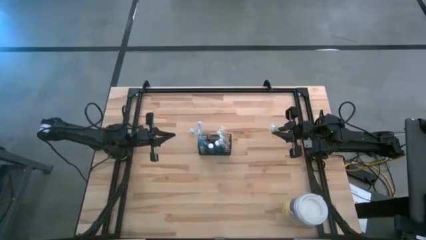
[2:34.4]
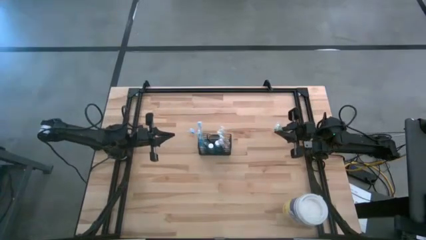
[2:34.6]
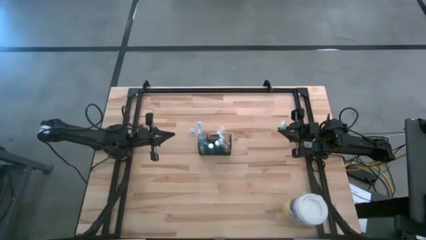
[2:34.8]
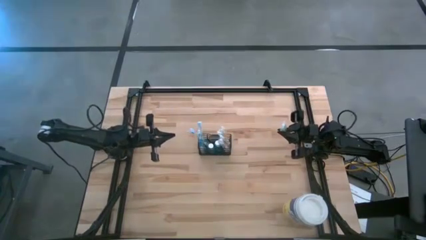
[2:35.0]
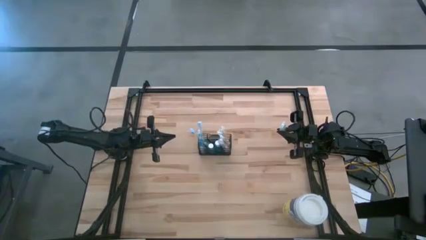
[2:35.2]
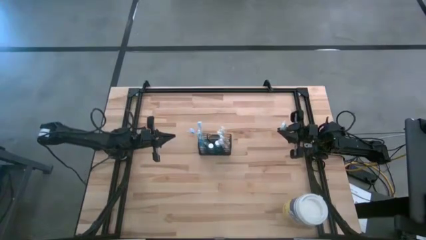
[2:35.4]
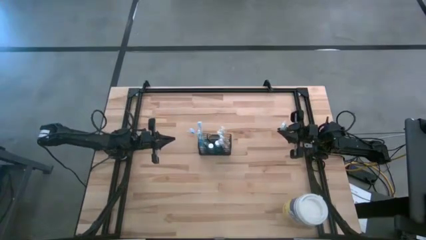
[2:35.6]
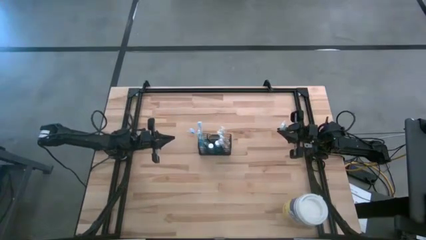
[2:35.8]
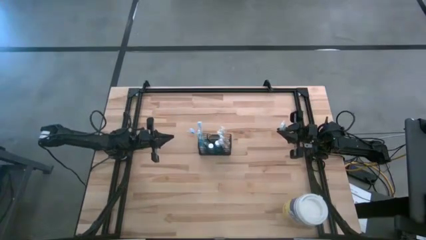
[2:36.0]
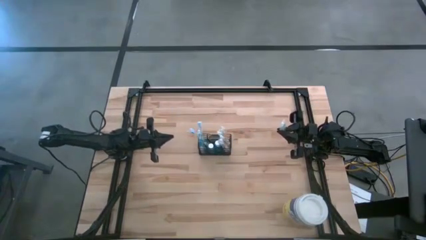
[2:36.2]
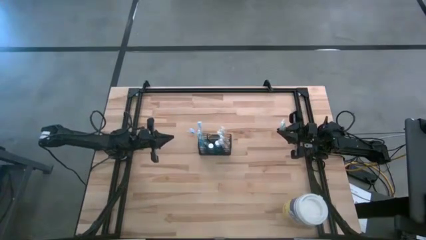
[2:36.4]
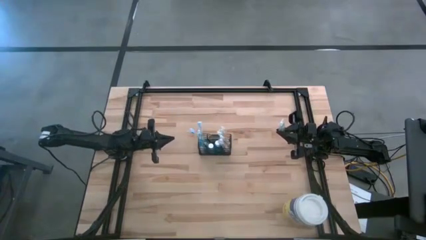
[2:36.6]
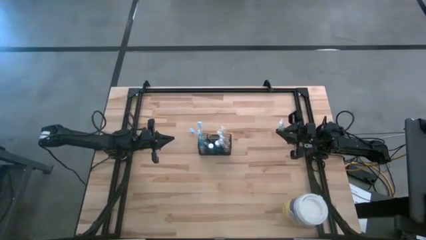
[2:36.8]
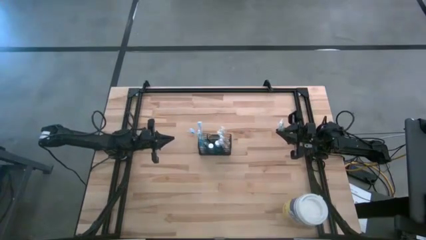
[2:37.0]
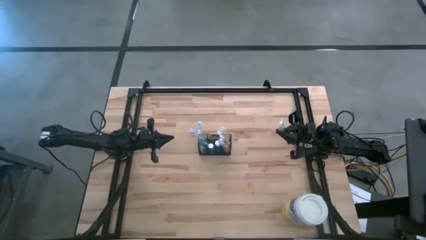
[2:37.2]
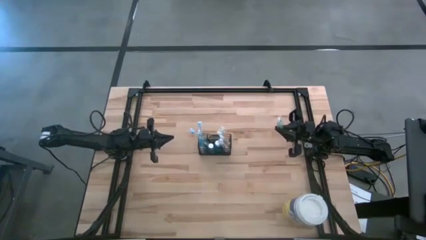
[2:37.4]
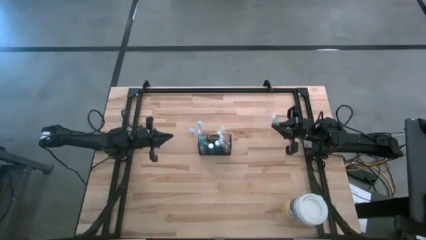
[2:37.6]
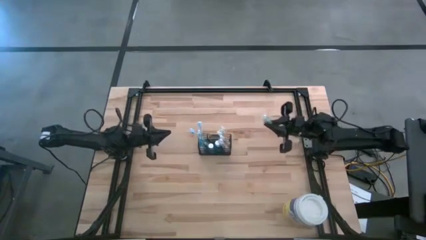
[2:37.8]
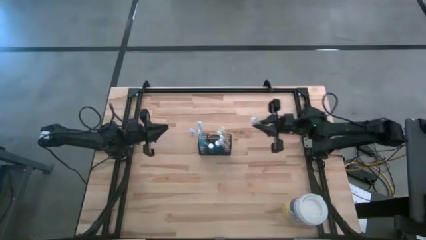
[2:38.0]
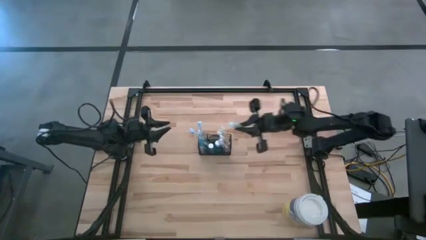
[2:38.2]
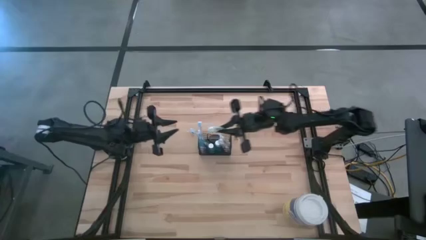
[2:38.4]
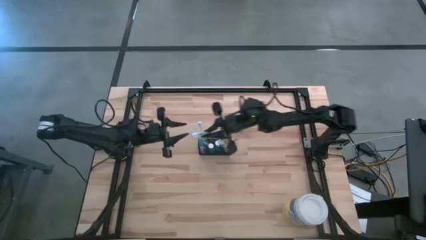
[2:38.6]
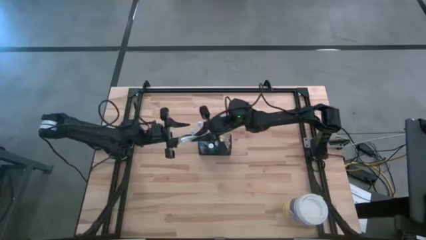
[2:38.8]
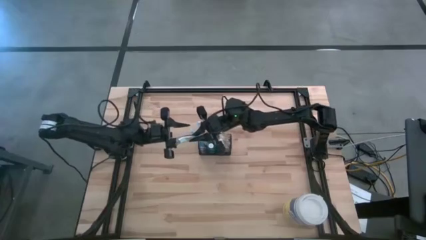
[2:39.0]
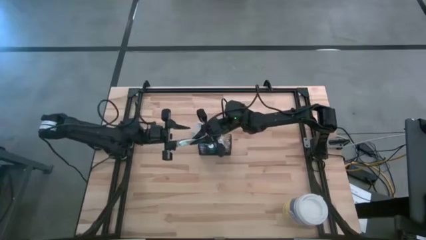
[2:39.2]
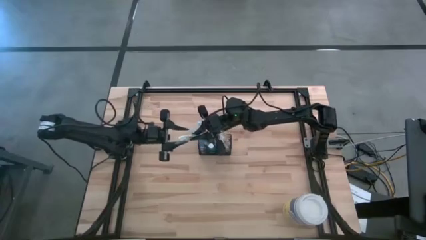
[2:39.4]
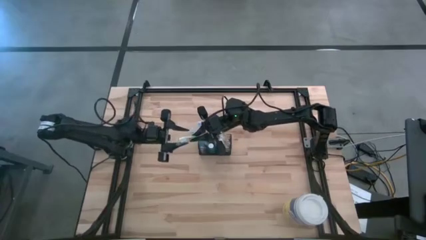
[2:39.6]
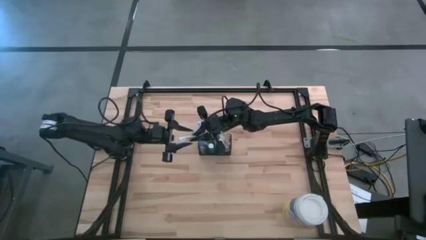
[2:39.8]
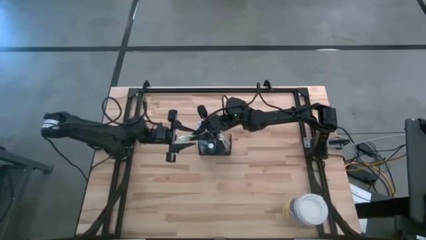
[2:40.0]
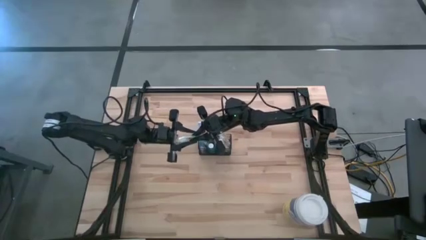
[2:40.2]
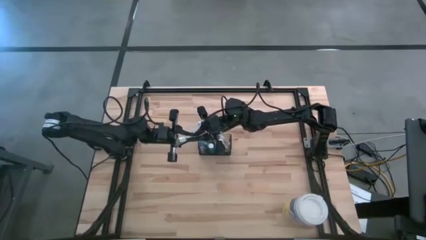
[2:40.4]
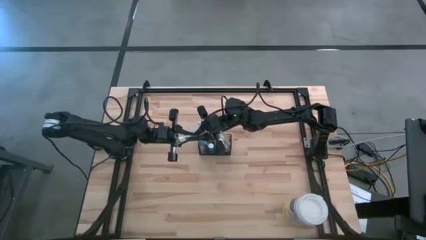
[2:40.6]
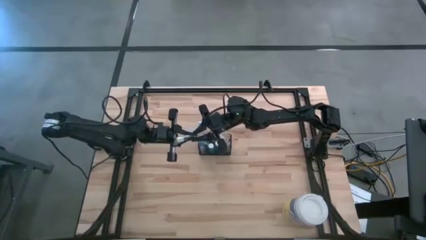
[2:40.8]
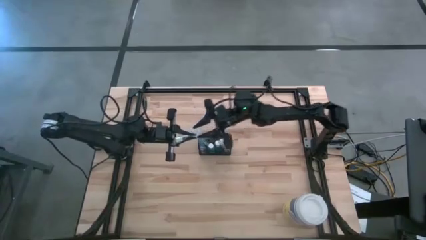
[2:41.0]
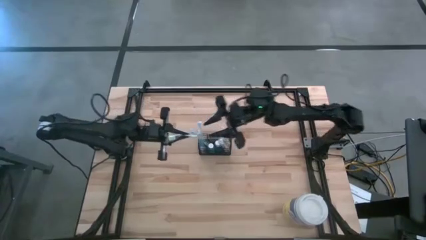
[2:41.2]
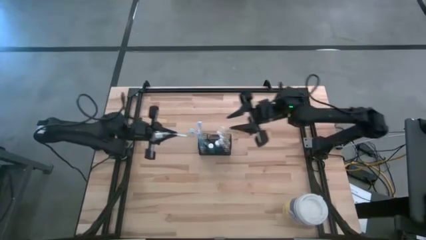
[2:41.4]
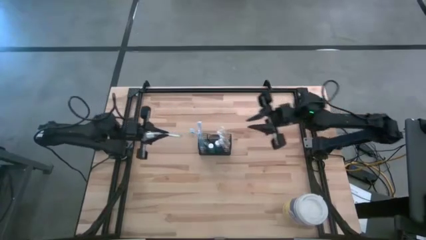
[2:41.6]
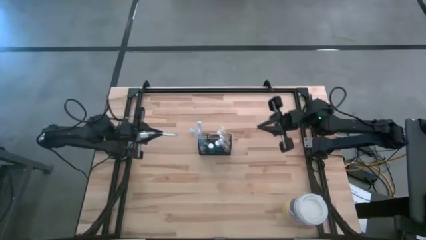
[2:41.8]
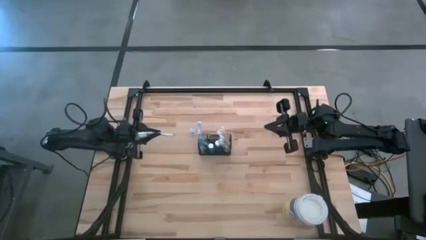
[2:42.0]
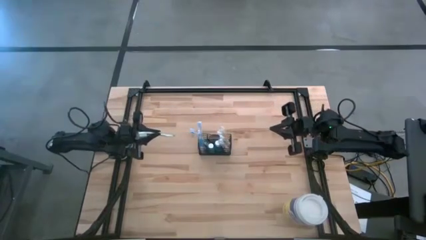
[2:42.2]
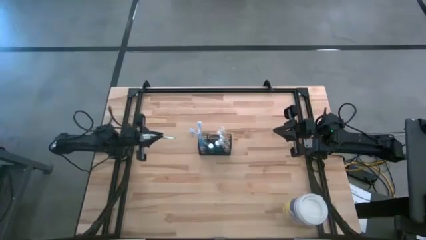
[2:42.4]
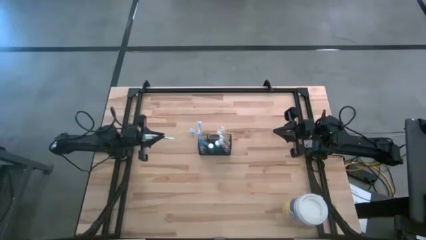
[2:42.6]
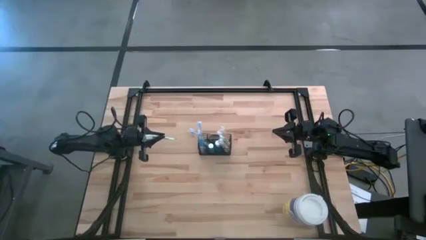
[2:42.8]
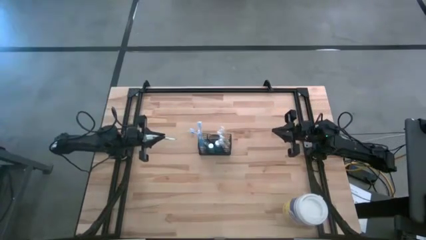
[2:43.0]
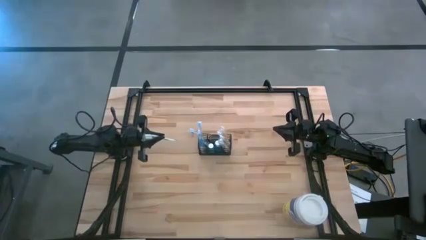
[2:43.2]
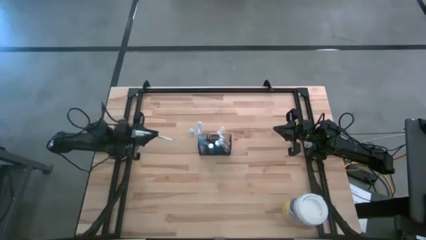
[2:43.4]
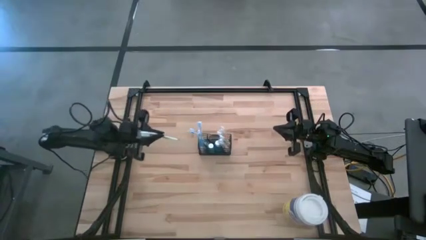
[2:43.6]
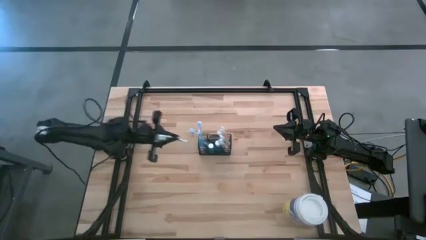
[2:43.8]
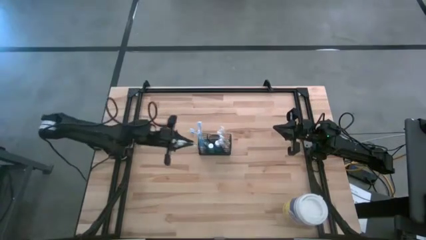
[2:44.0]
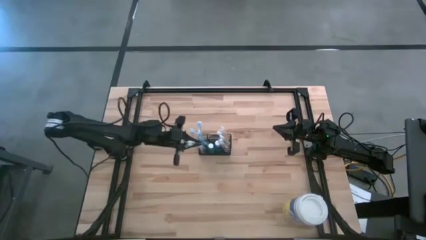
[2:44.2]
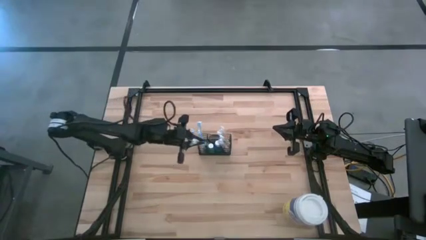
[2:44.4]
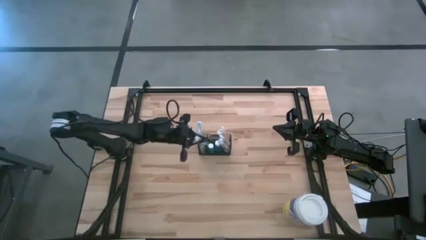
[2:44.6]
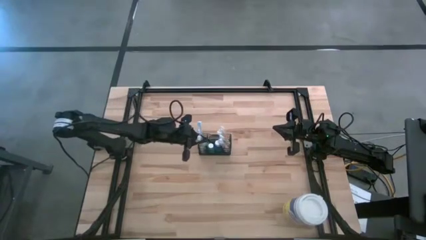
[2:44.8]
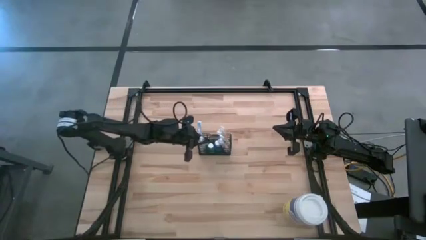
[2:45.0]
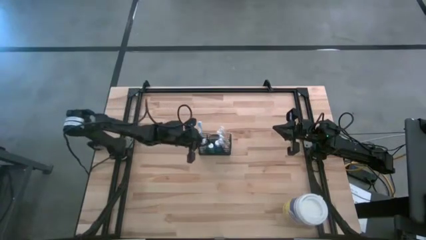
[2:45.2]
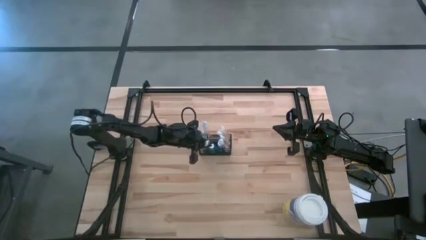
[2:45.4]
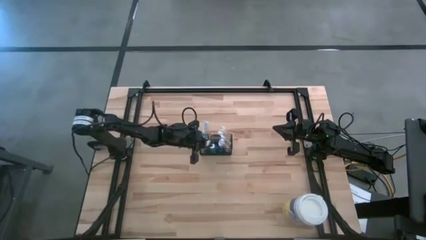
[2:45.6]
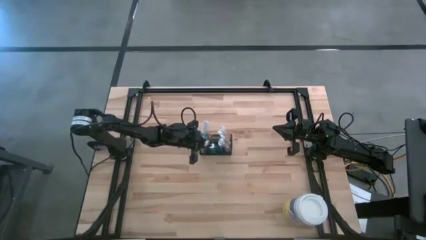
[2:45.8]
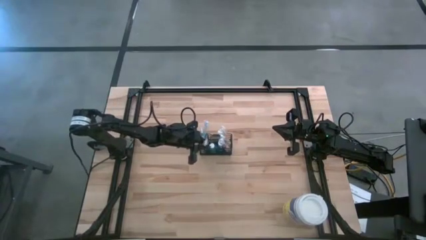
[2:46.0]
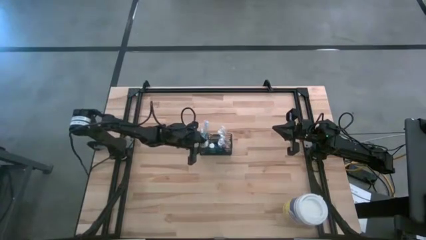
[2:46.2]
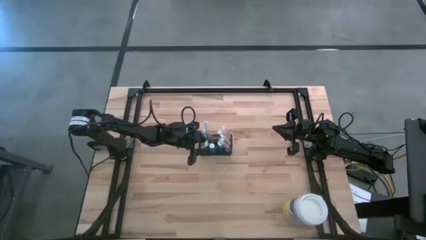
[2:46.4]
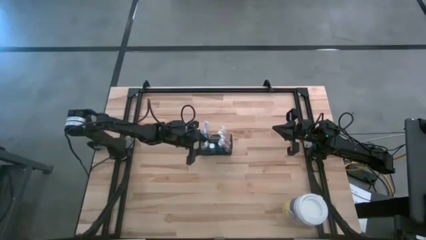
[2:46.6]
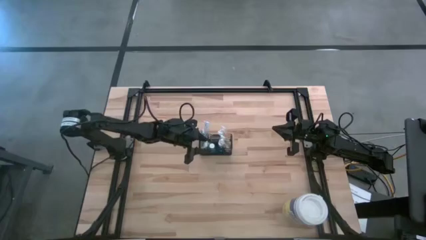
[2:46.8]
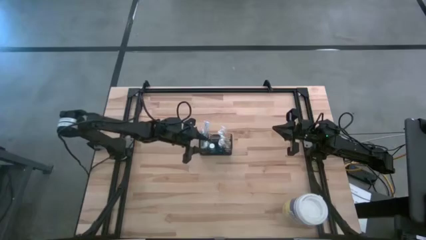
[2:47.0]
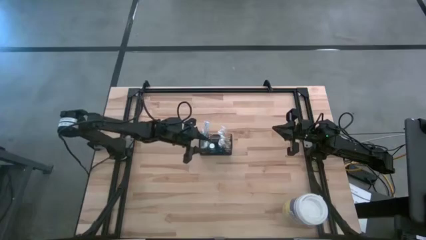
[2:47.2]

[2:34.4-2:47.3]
Task: Pick & Place toothbrushing station
Put the green toothbrush into the black mesh organizer
